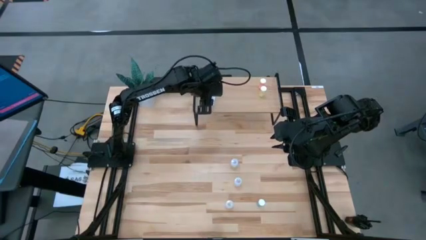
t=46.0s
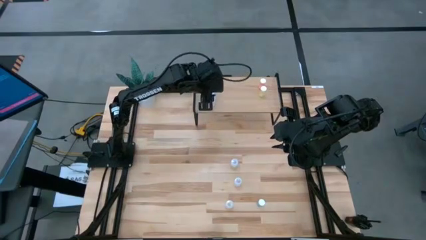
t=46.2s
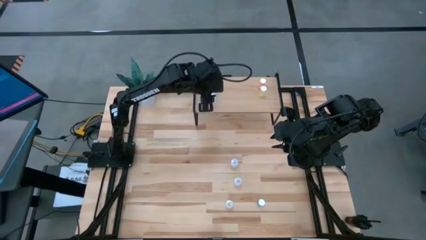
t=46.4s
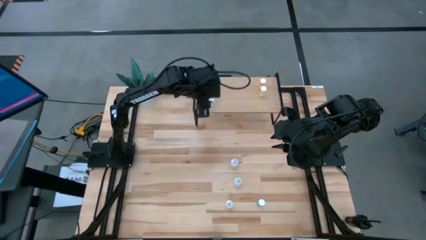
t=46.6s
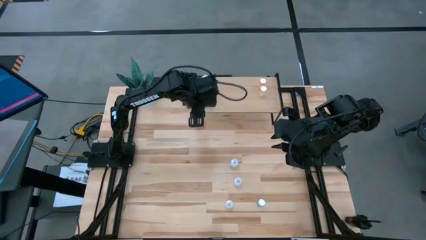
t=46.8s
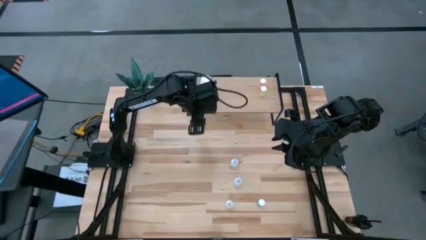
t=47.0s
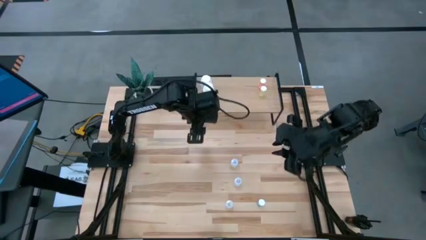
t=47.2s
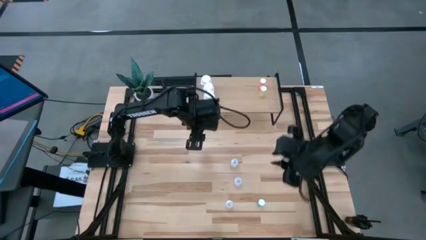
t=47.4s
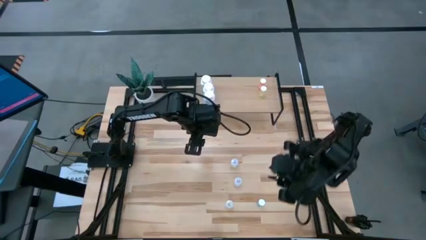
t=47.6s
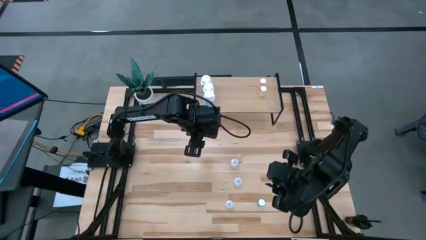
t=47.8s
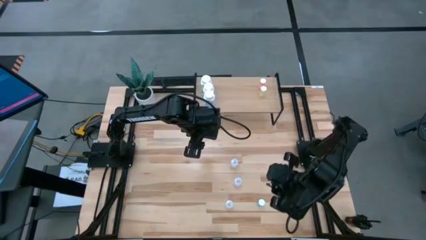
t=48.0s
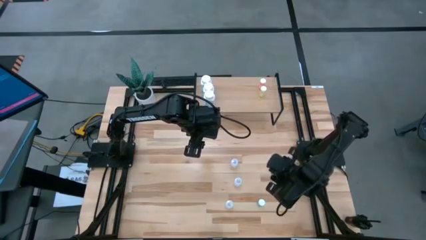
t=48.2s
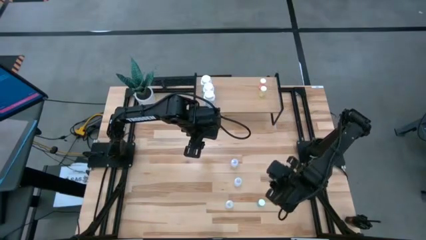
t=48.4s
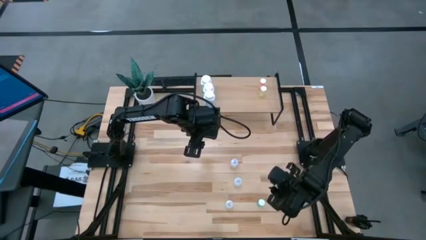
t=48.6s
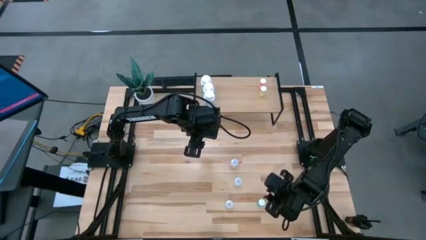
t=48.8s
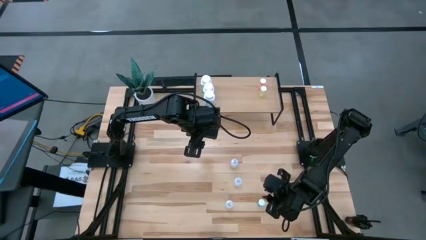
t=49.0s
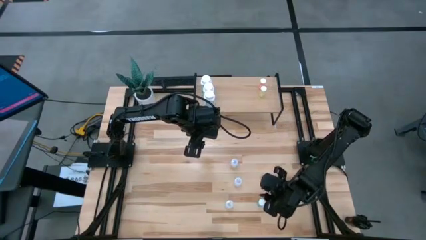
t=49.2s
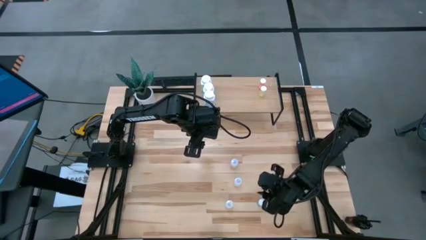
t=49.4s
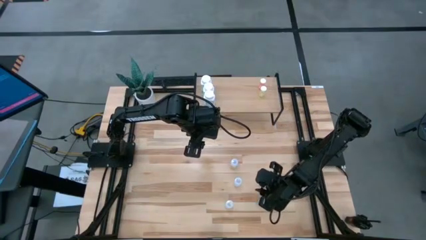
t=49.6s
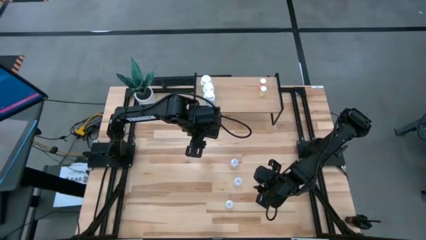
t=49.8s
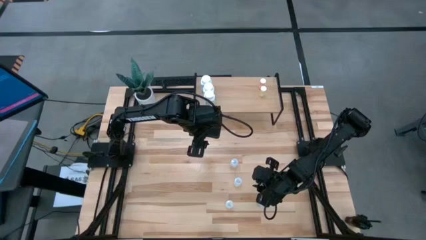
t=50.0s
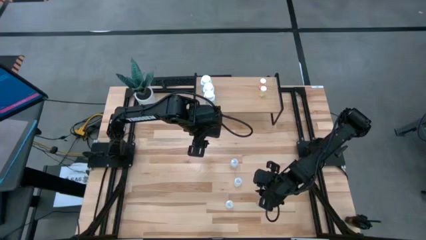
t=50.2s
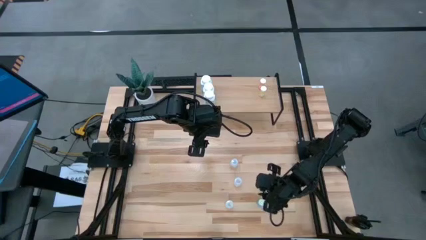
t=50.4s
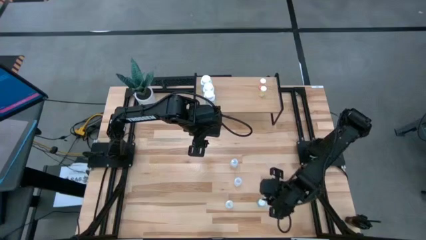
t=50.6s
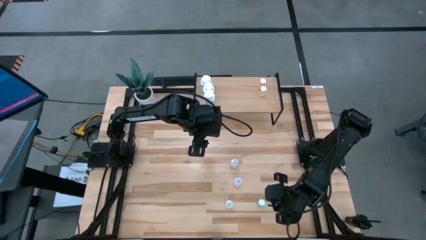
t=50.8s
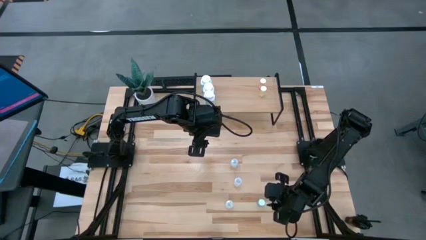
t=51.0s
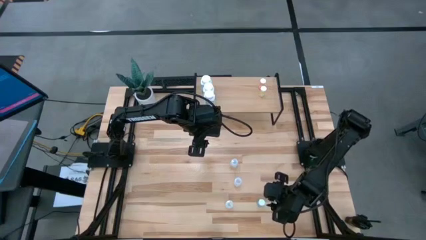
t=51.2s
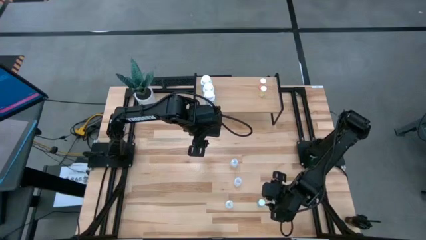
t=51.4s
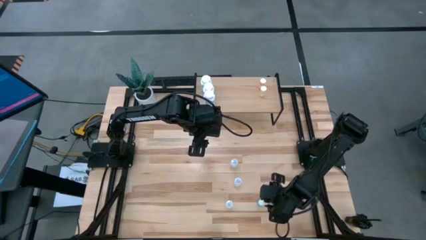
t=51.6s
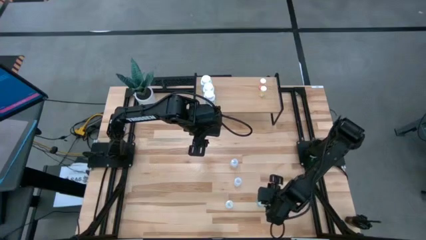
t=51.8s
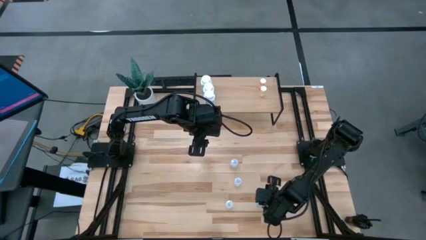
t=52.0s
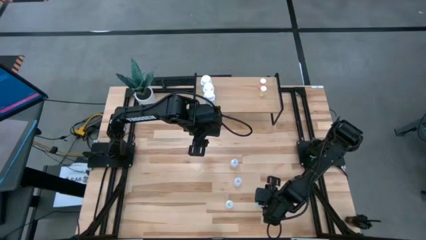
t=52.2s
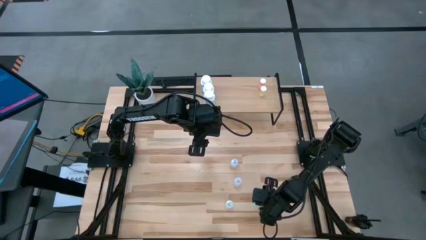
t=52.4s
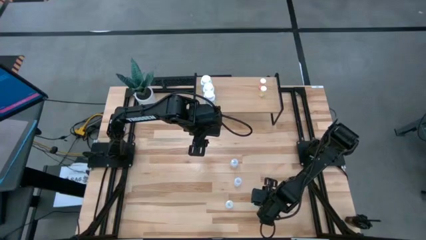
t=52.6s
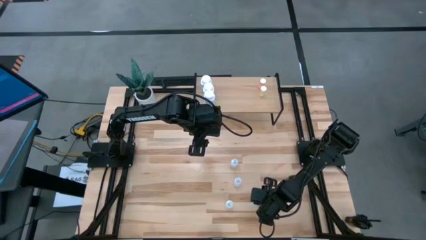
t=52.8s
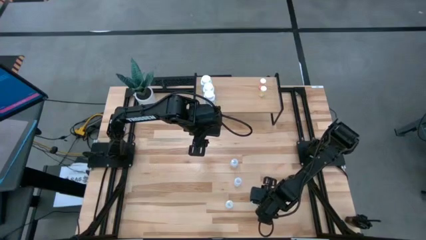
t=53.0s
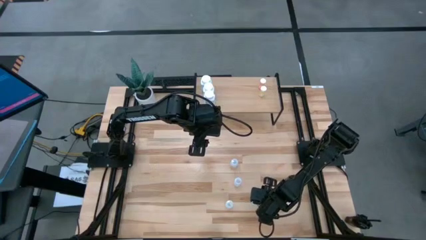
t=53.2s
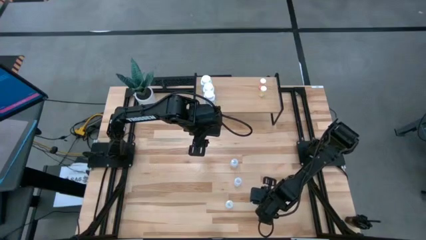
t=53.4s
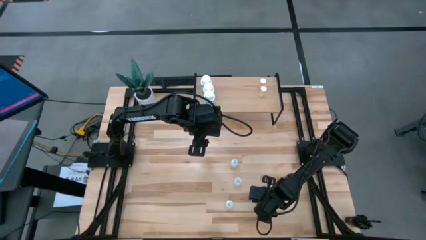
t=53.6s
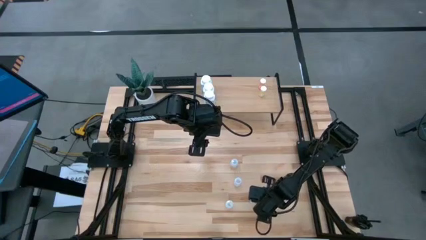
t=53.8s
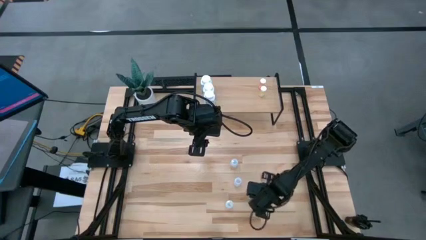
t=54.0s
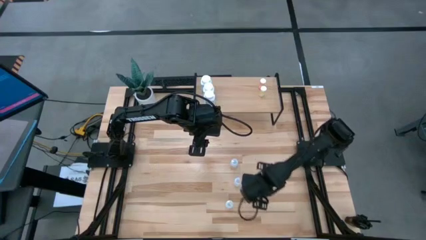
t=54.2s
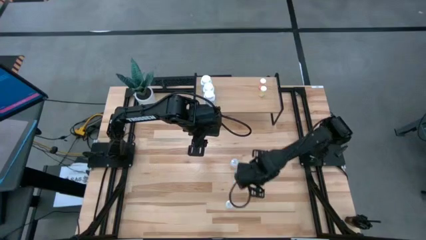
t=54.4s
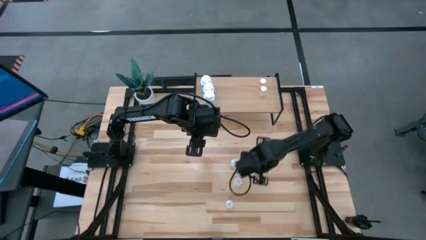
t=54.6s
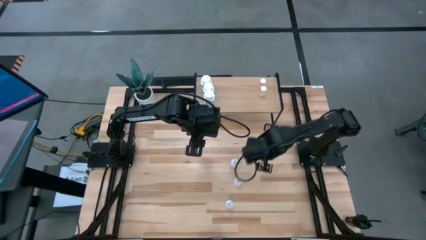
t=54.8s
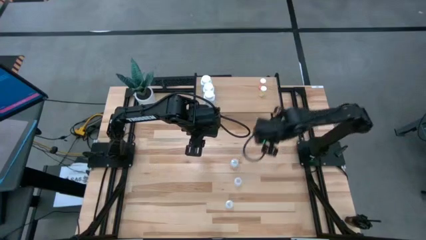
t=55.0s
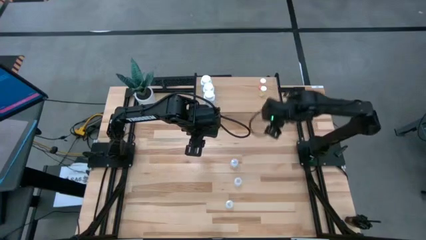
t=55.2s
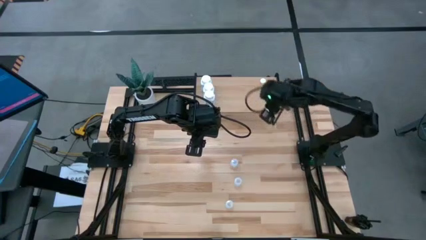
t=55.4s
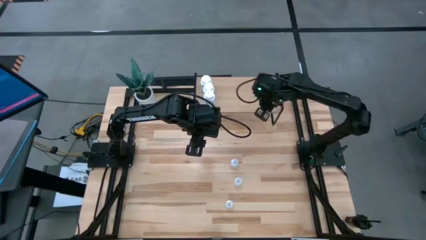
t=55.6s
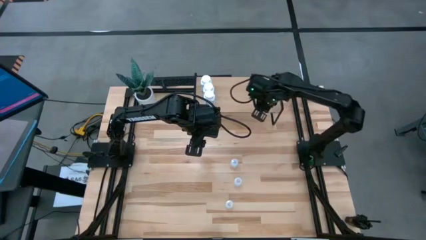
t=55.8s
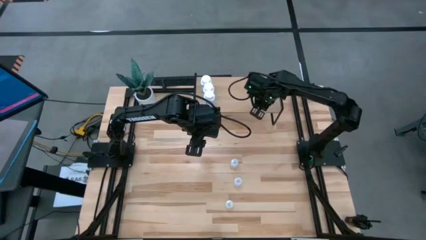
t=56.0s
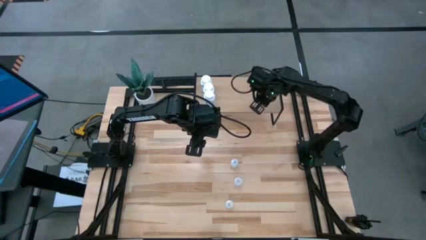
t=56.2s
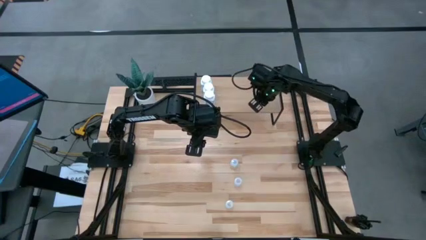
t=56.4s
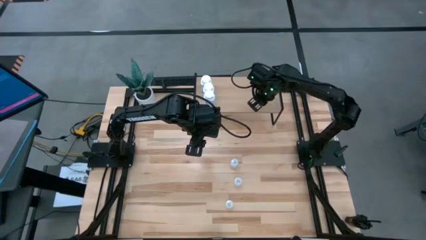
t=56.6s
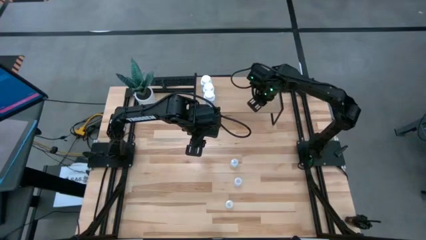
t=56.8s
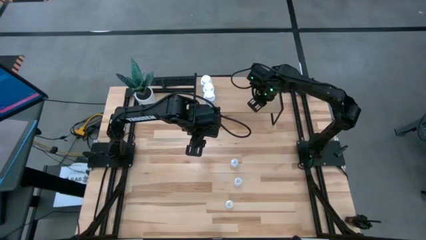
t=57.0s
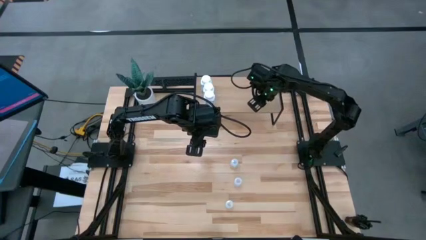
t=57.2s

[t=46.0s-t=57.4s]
Task: Pick and place medicine bottles onto shelf by color
Put the blue pill bottle on the shelf aligned with the other blue pill bottle on the shelf
